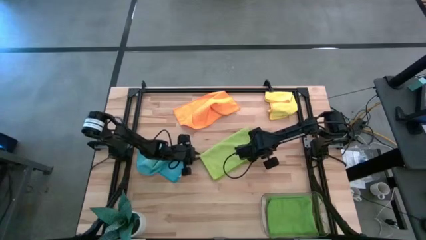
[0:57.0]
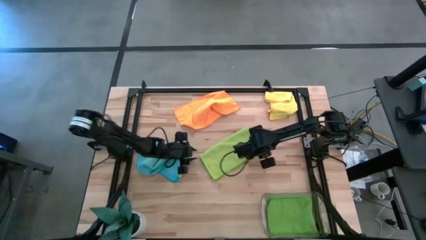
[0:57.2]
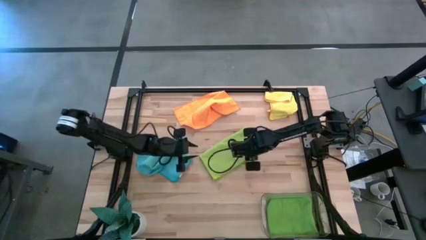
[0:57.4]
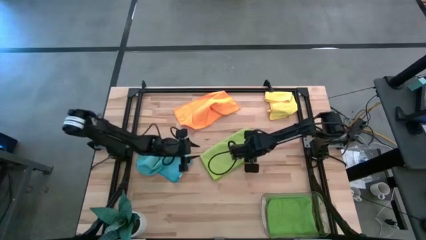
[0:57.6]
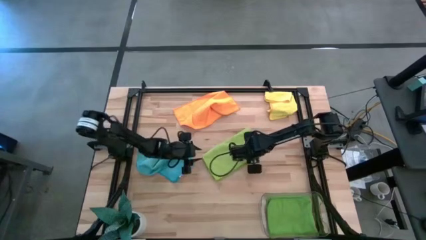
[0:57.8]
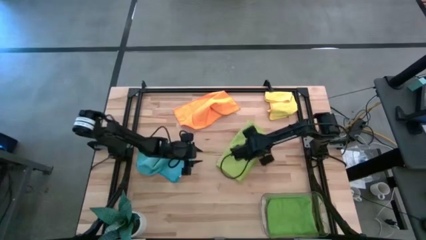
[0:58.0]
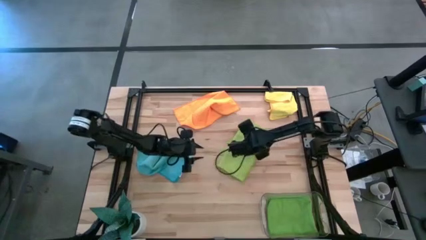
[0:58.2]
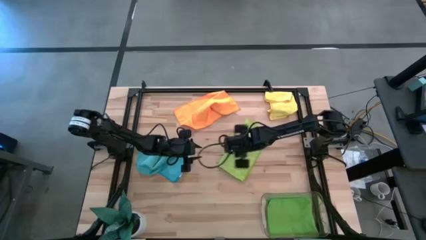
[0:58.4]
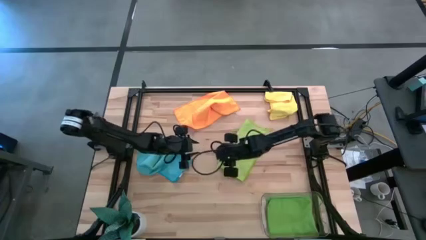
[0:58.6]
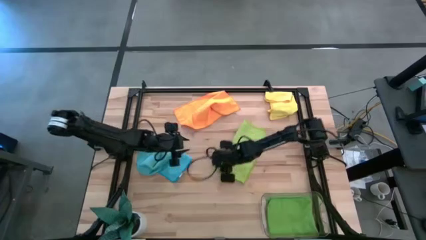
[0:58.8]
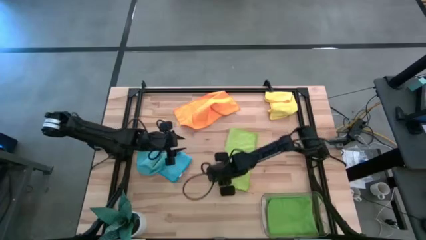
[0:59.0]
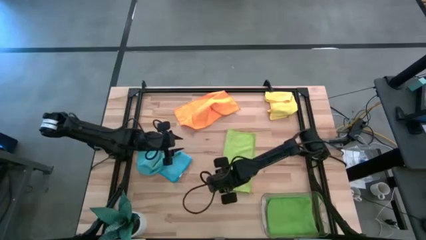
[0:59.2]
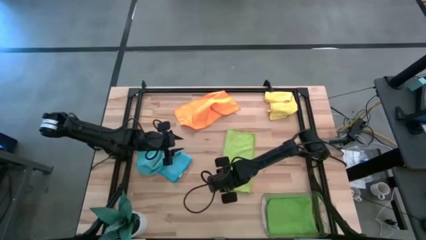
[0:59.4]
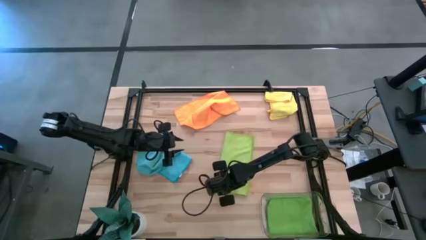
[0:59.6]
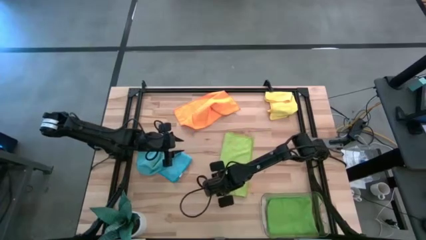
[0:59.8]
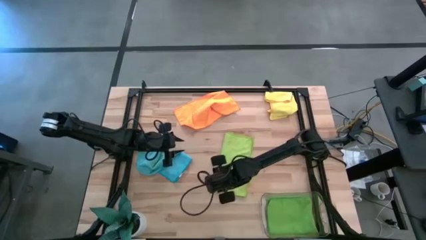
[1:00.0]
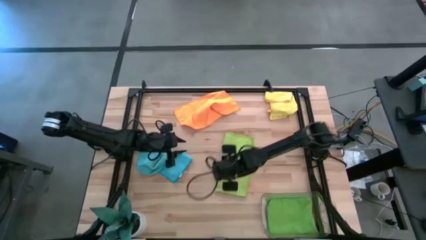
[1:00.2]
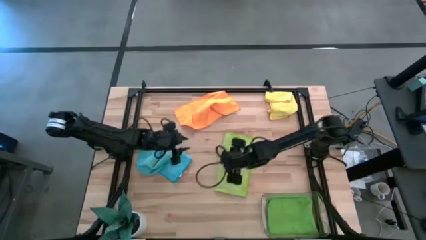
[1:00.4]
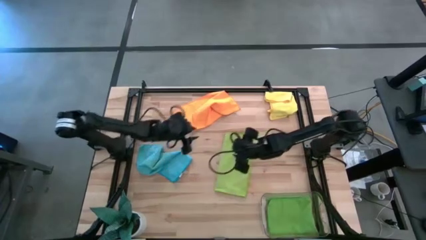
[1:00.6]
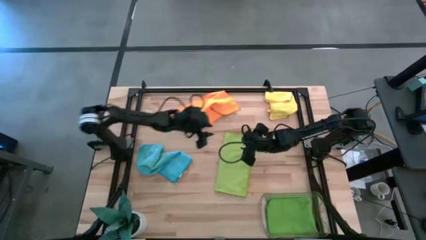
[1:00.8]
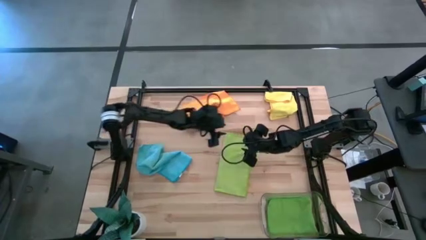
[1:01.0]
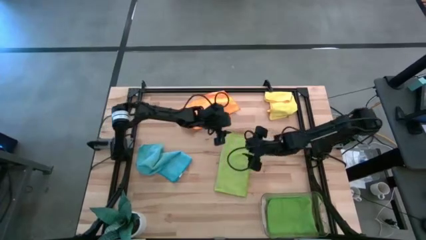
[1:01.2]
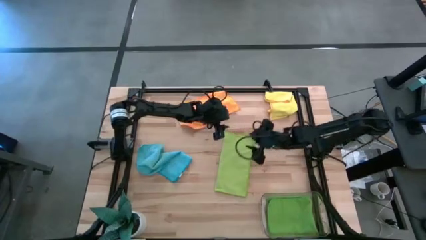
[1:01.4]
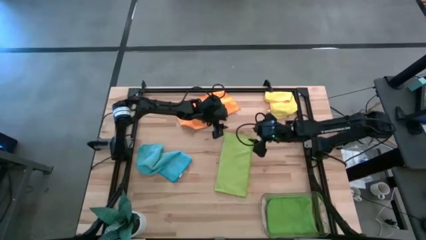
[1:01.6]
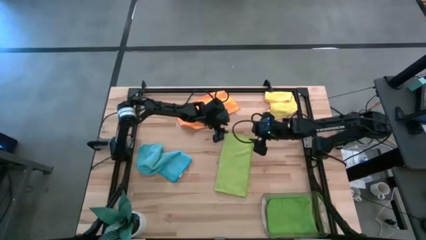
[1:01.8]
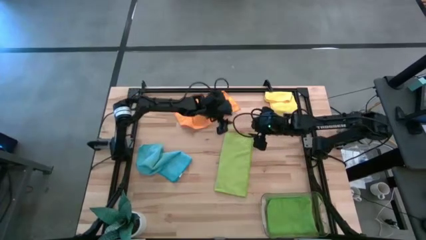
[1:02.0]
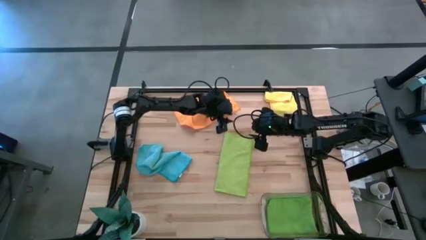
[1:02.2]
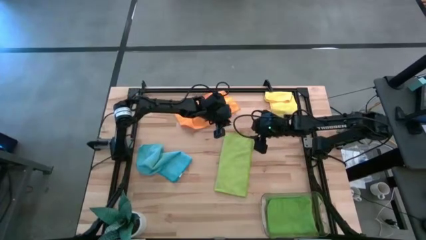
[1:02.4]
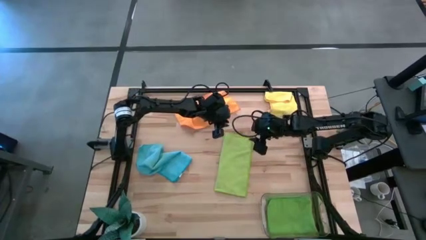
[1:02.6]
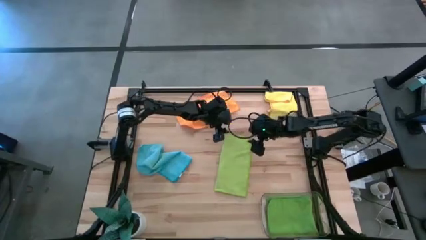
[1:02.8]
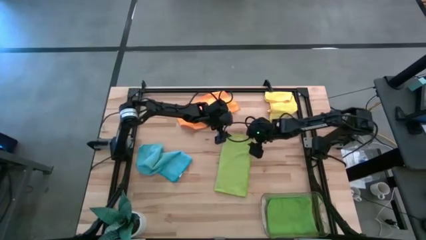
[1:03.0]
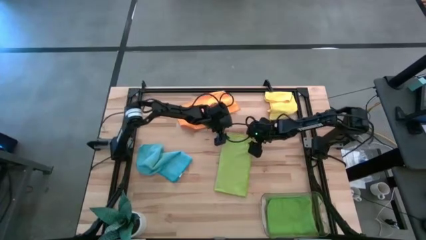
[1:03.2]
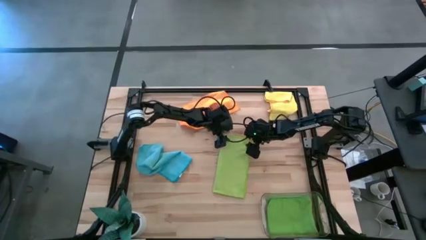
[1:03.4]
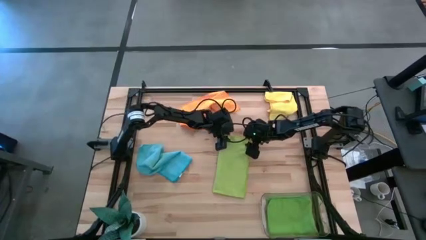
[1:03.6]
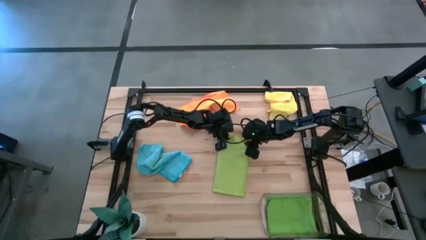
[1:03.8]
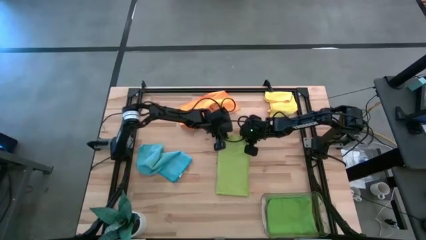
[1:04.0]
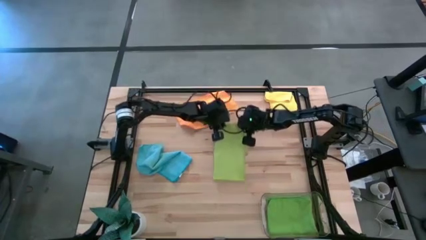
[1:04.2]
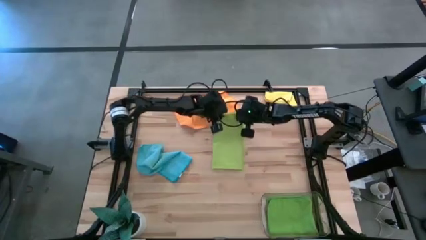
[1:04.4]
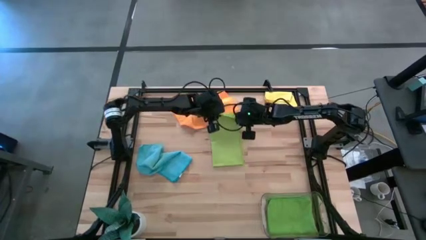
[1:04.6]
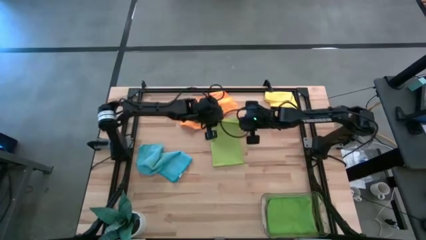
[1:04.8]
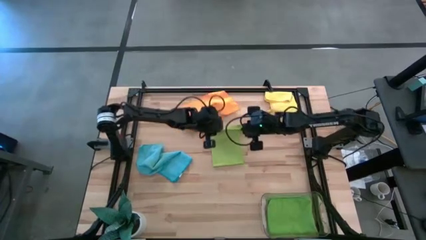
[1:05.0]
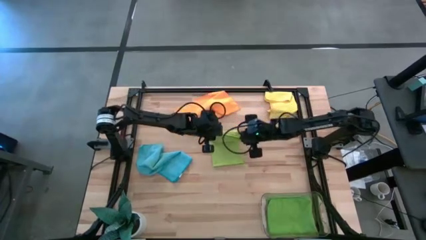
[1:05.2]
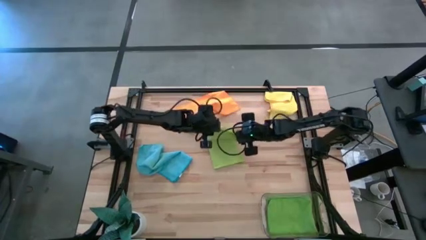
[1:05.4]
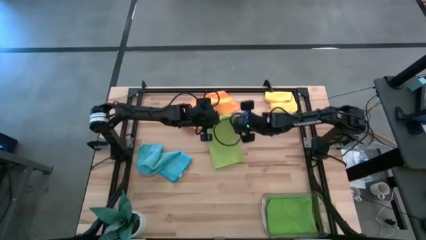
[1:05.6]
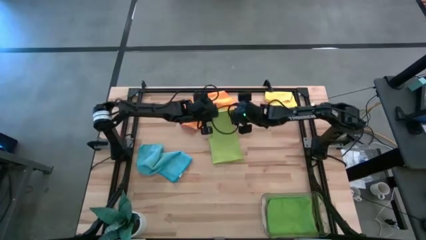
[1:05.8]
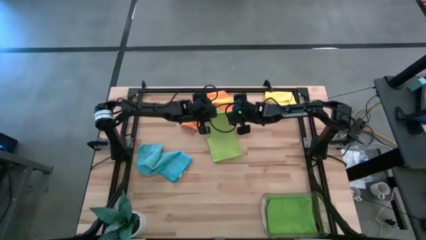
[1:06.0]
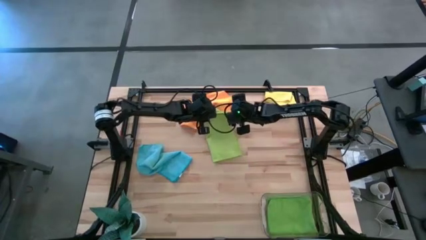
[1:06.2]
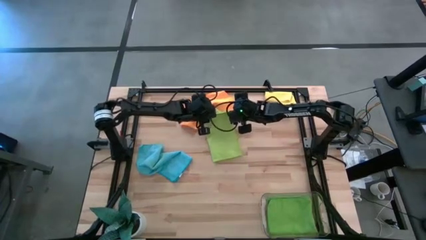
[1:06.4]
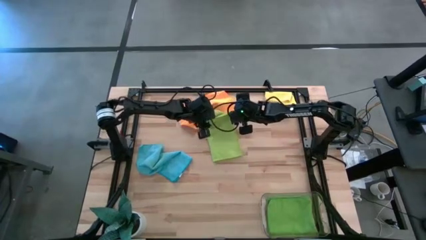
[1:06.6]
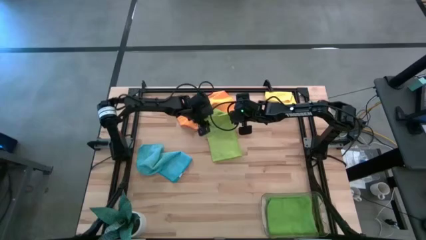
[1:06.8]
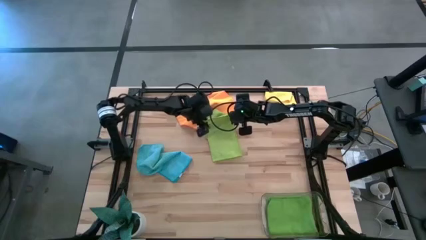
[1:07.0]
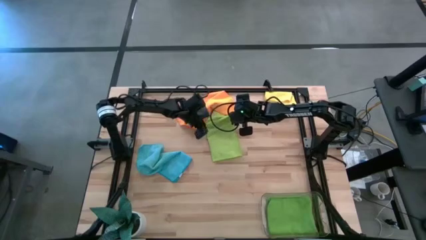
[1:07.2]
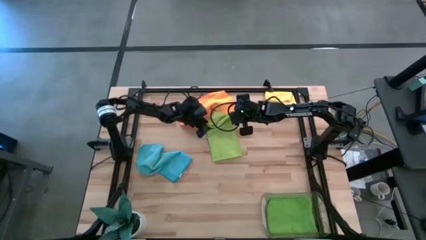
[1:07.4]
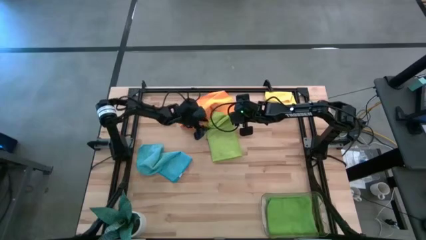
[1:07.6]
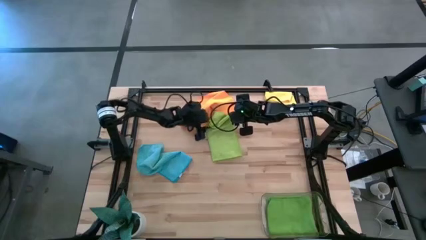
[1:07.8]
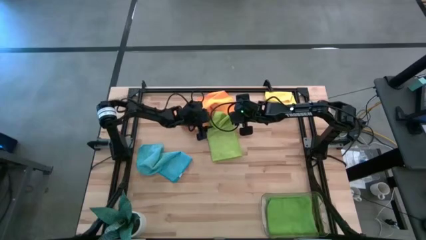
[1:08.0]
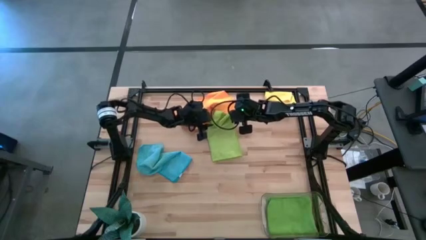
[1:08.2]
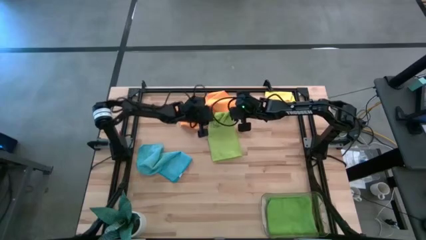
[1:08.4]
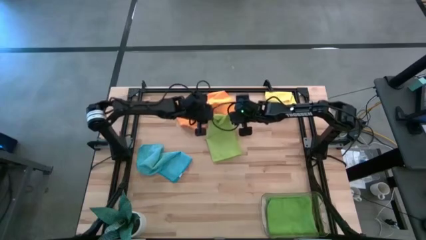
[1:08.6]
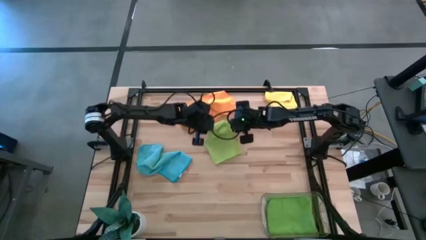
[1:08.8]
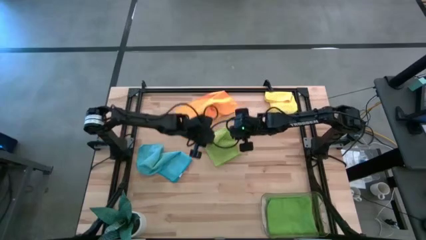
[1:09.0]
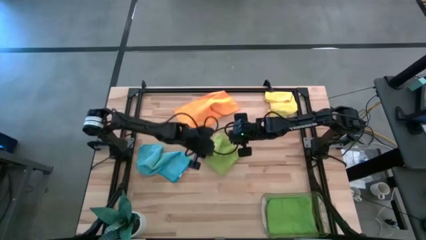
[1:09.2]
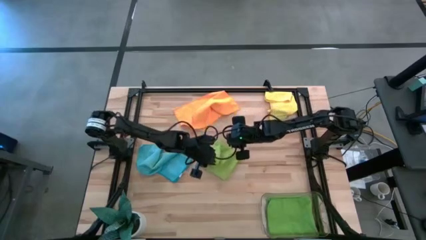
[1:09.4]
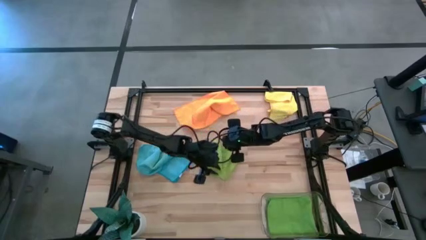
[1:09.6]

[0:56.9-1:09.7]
Task: Fold microfiber towels
Fold the light green microfiber towel

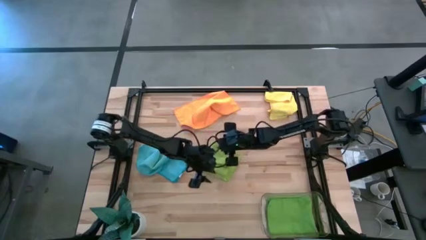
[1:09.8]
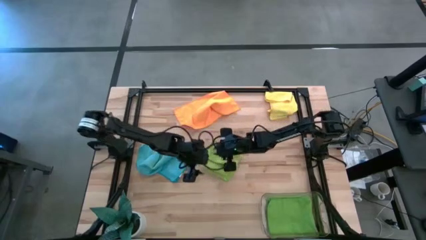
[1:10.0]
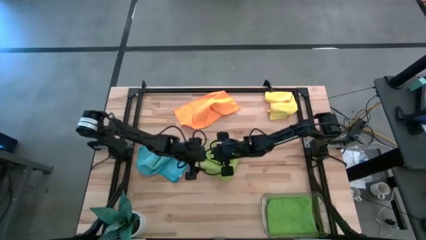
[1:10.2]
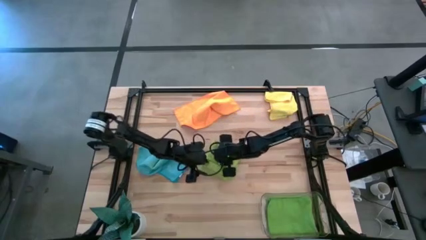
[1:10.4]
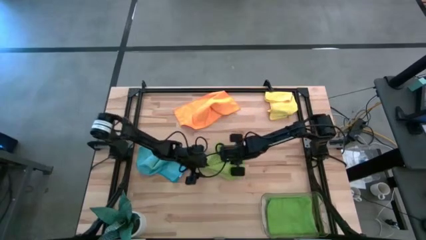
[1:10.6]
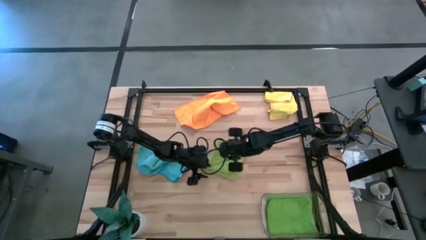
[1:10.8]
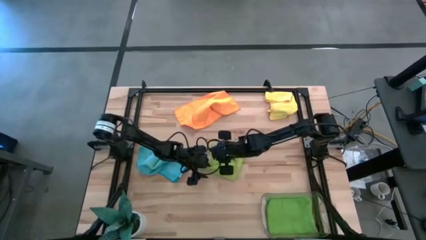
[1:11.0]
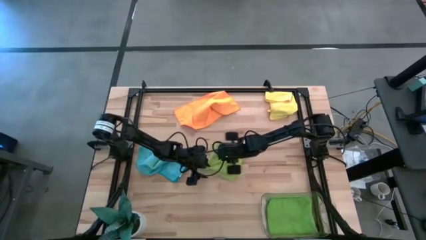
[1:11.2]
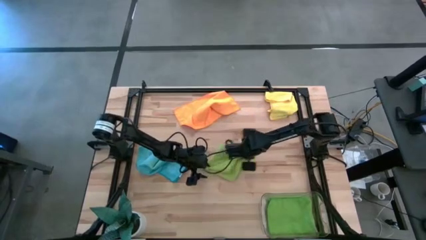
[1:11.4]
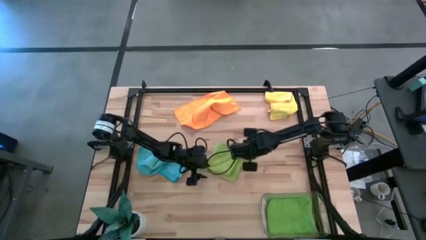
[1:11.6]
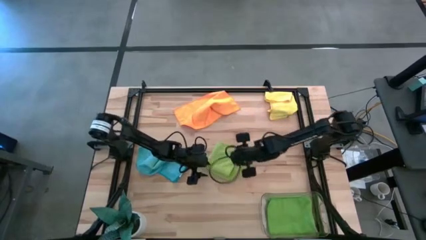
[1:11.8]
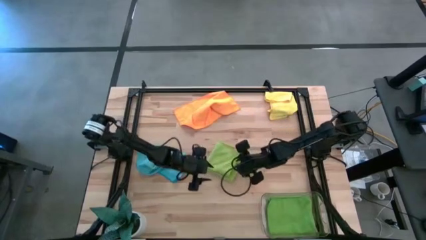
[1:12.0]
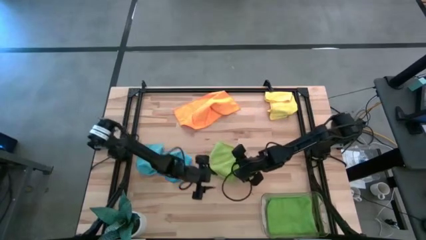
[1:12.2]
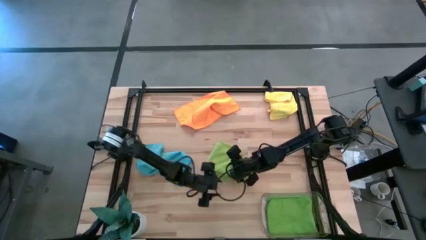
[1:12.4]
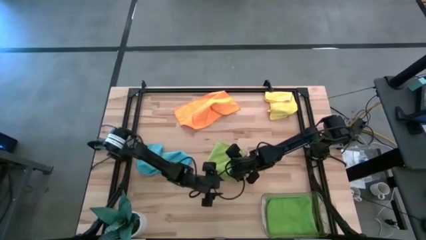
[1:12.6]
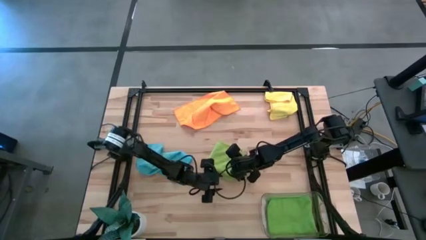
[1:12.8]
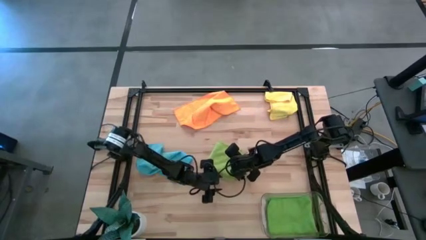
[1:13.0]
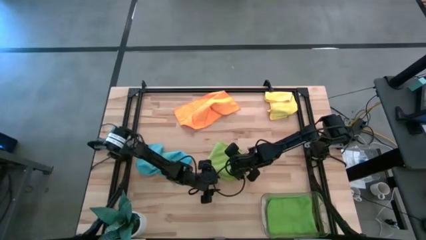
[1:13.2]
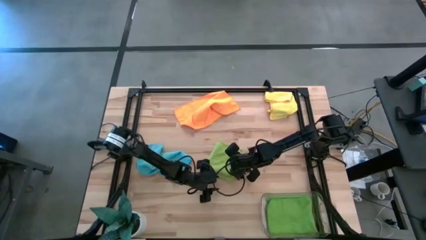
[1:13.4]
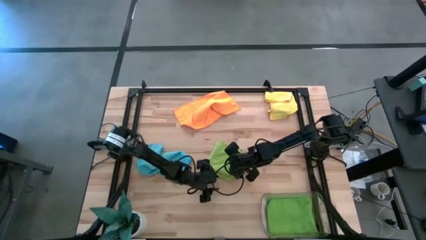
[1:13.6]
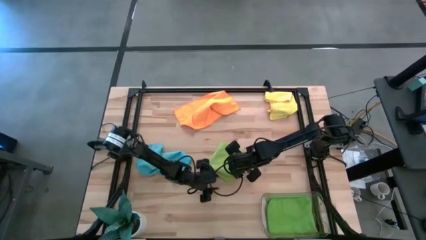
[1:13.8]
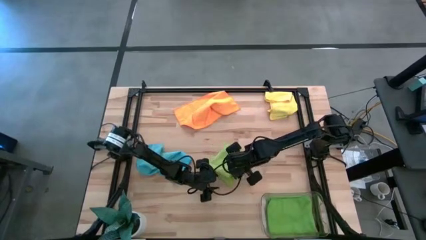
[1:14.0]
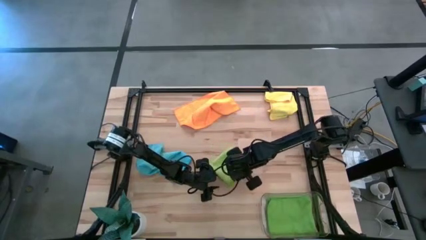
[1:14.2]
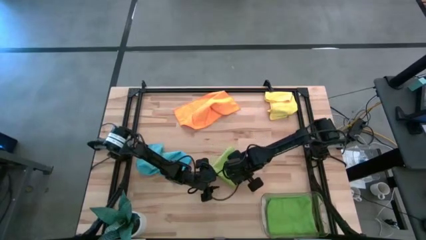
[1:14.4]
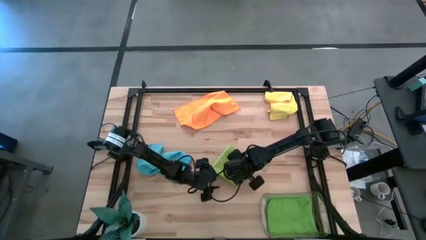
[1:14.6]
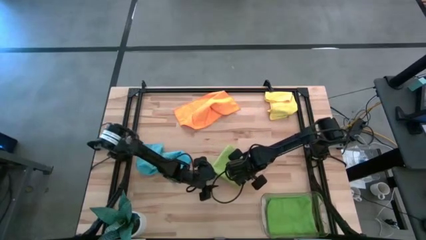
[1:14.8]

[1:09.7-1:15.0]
Fold the light green microfiber towel
